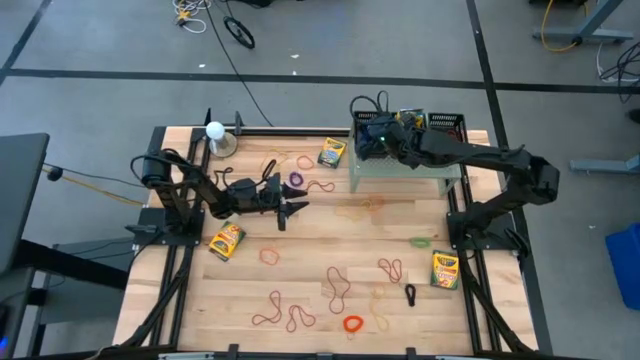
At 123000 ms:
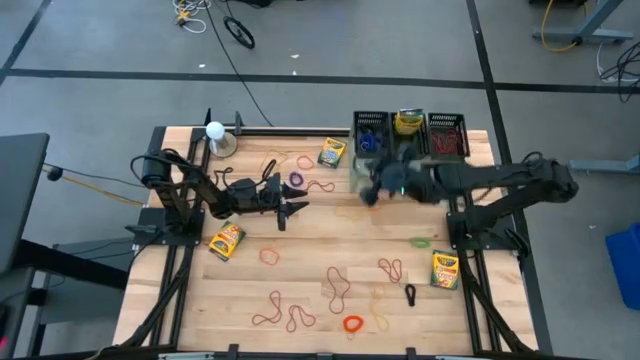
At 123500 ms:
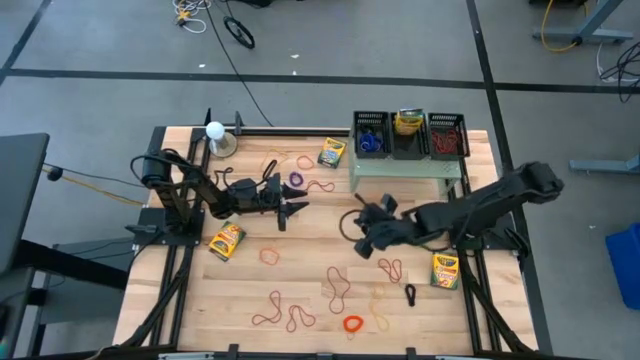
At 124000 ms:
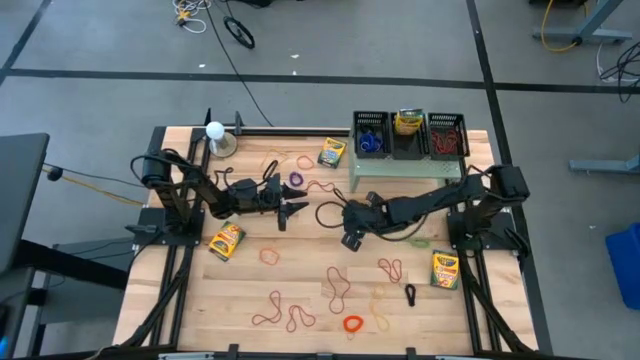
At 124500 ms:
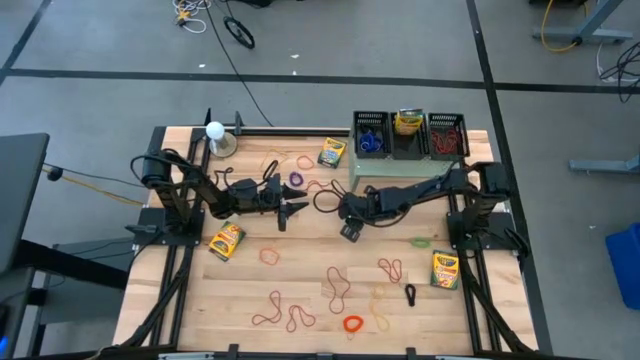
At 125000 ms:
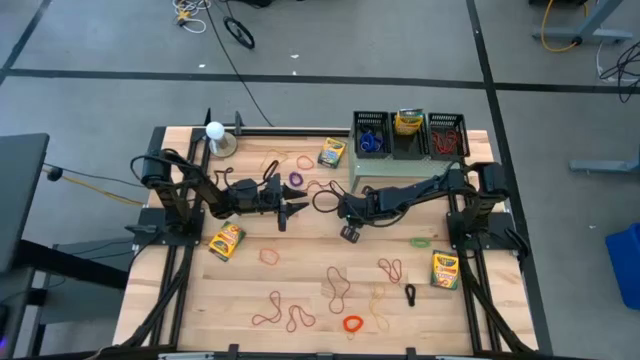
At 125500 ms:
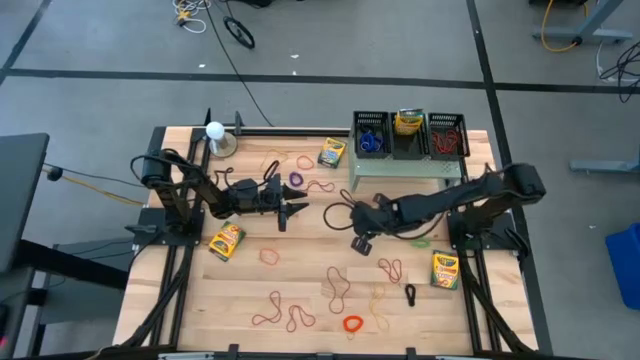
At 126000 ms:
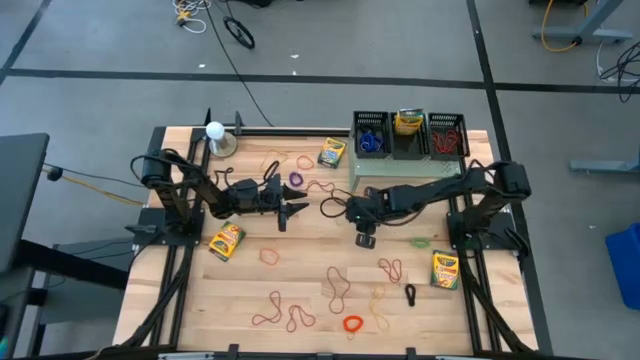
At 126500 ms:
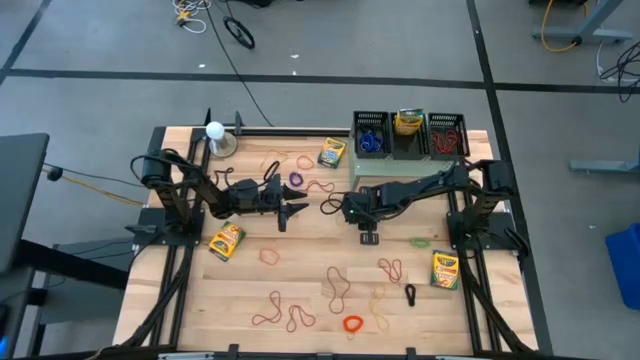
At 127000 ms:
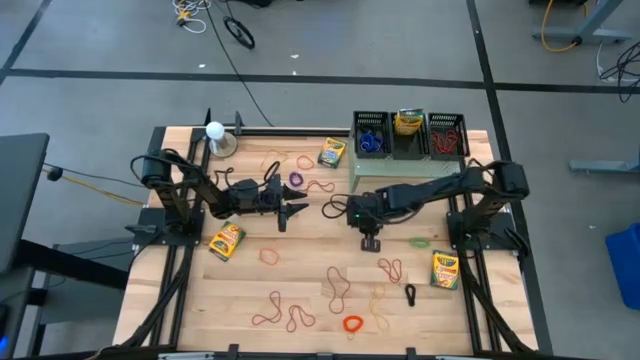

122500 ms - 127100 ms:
Task: Pick & Place Office Desk Supplies
Put the middle yellow rubber band into the right black basket on the shelf

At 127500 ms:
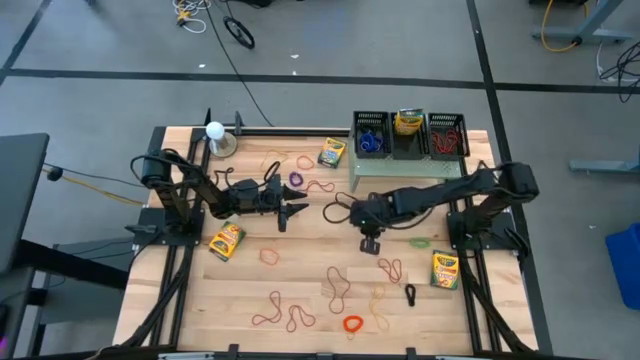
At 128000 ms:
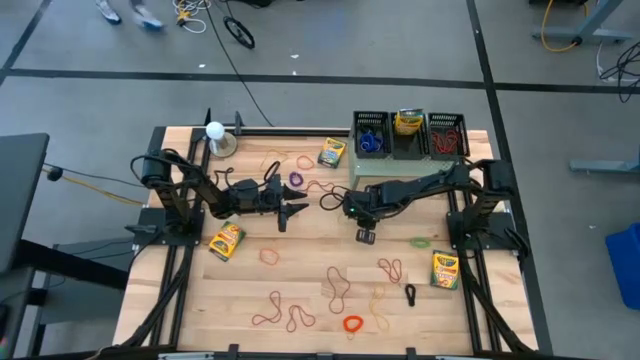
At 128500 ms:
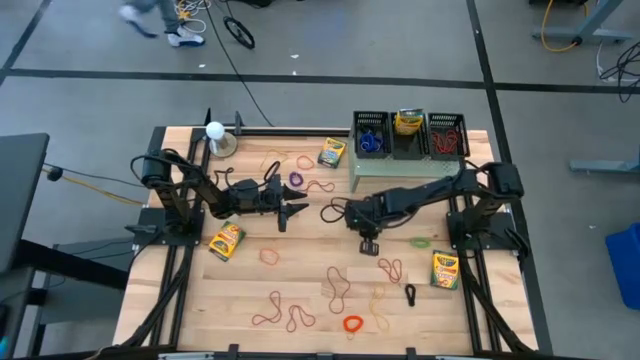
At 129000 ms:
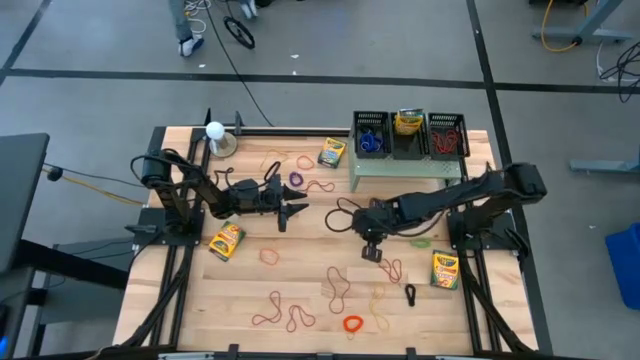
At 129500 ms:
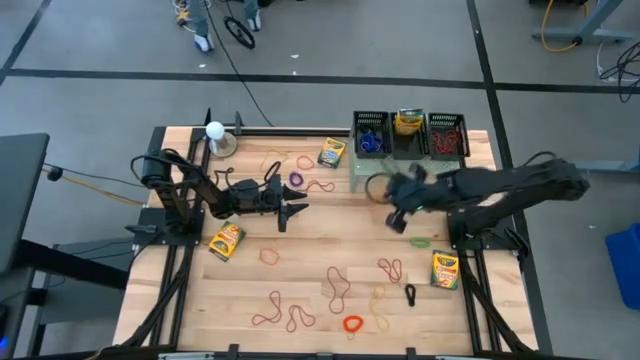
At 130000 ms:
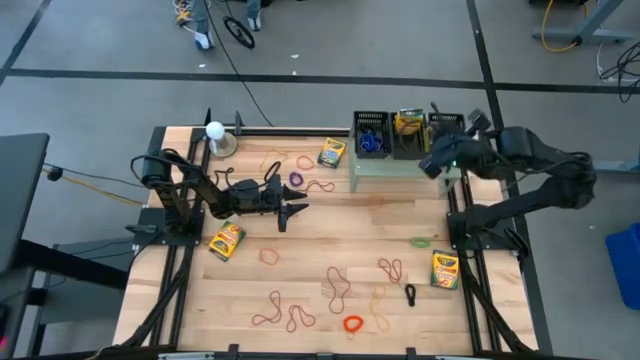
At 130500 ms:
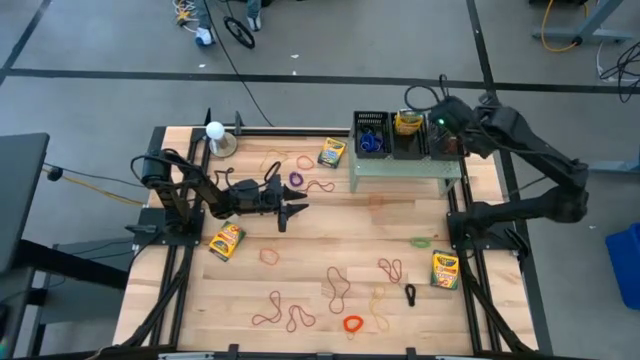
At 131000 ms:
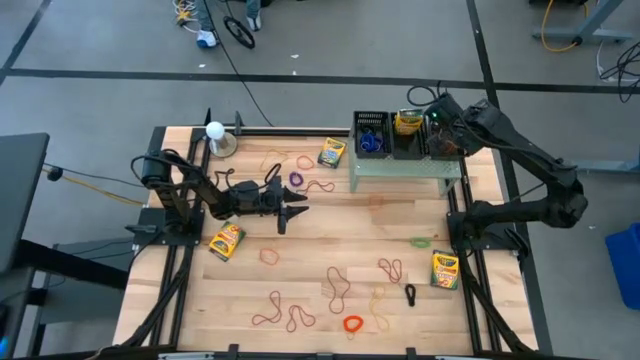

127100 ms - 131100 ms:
Put the middle yellow rubber band into the right black basket on the shelf

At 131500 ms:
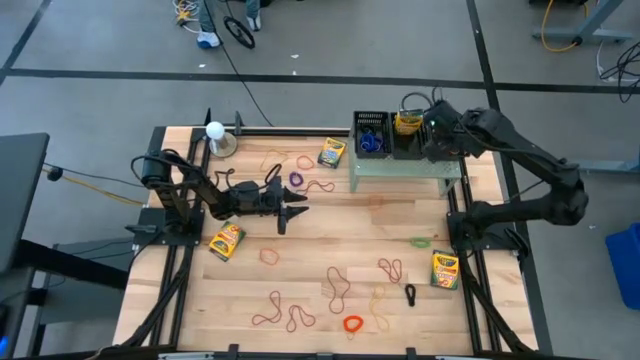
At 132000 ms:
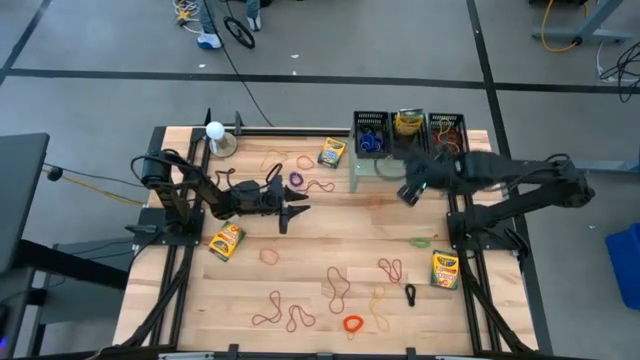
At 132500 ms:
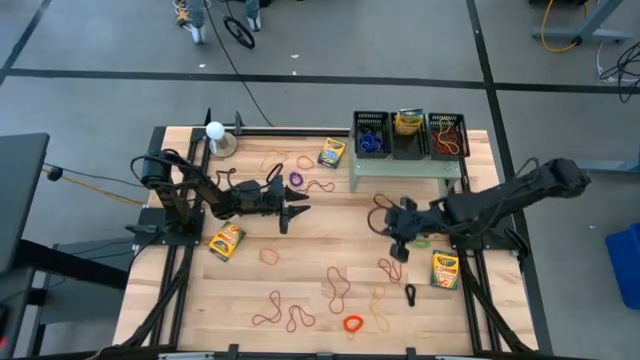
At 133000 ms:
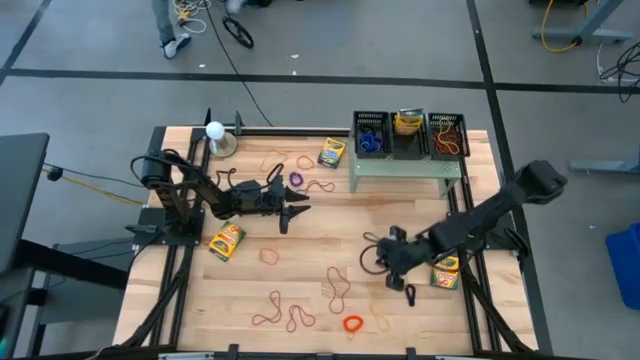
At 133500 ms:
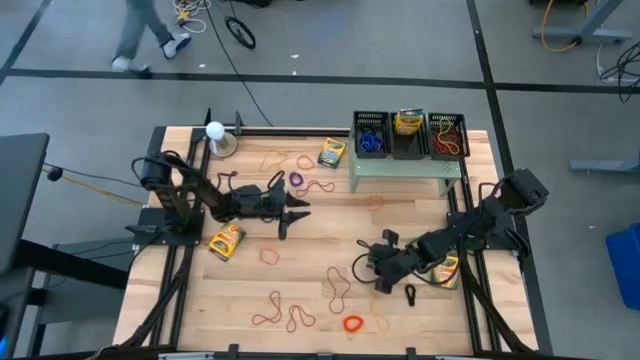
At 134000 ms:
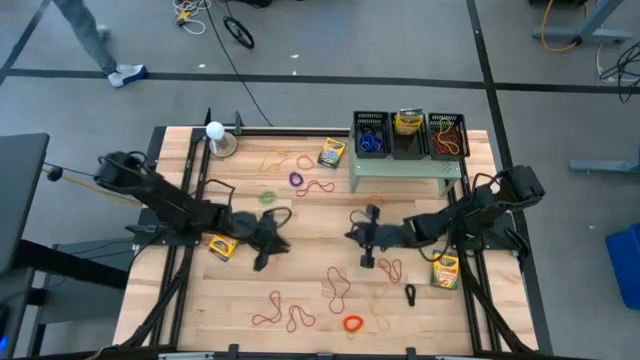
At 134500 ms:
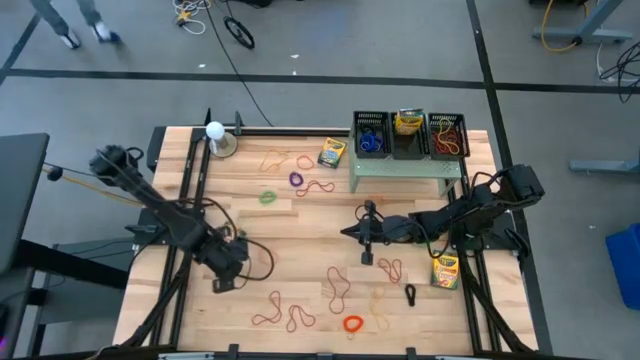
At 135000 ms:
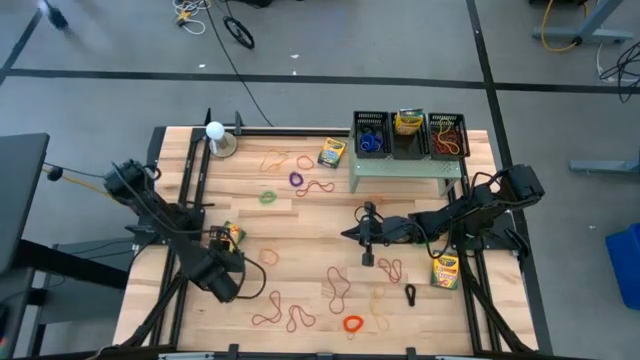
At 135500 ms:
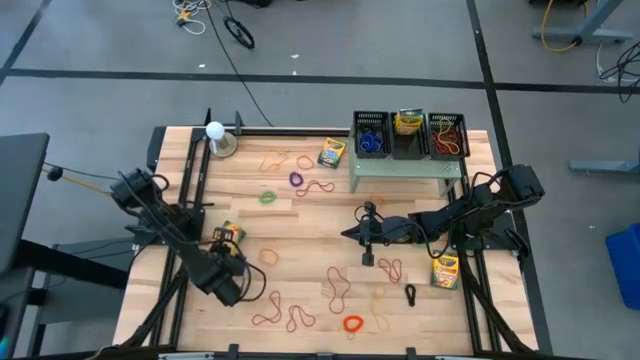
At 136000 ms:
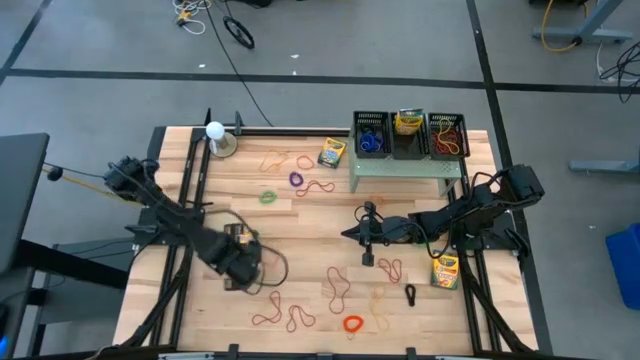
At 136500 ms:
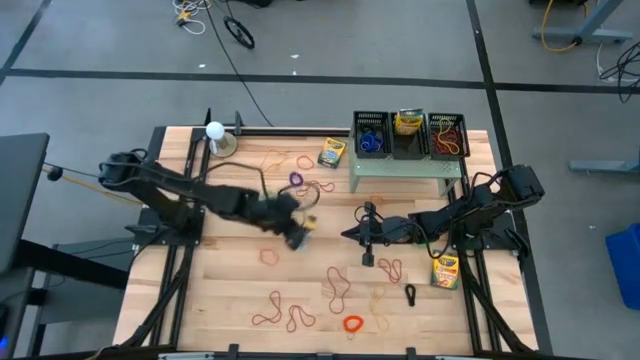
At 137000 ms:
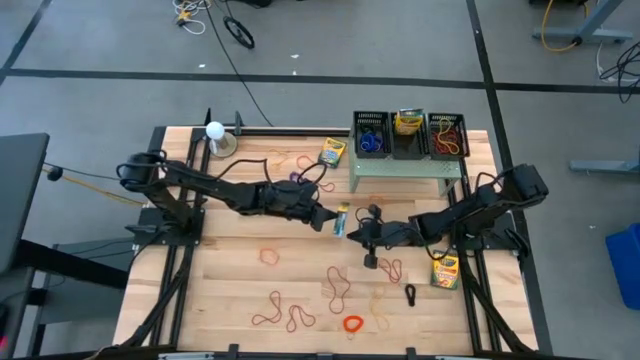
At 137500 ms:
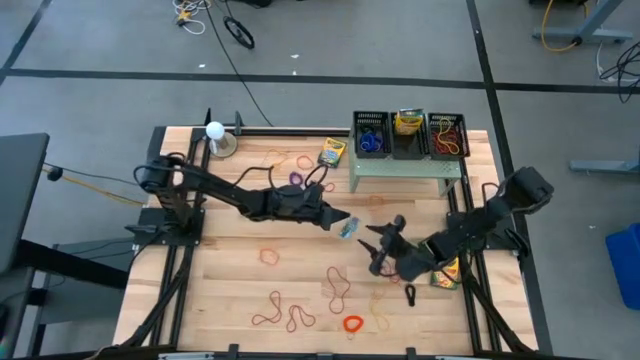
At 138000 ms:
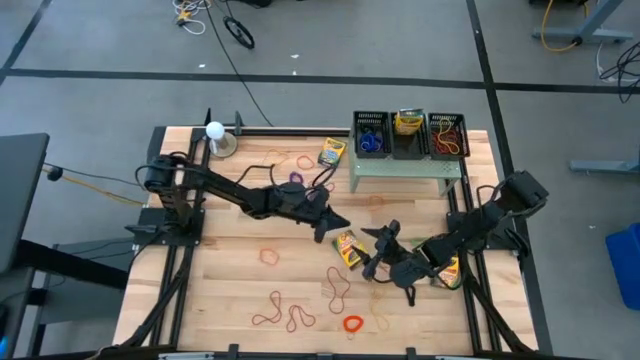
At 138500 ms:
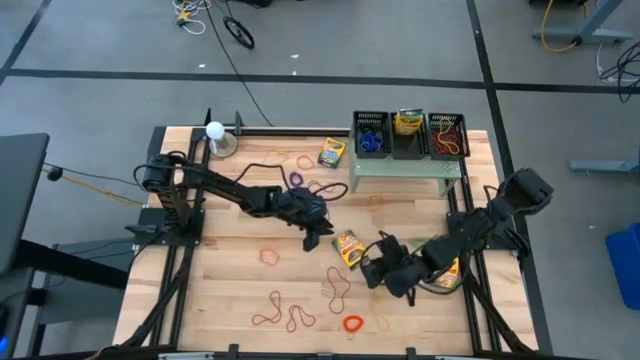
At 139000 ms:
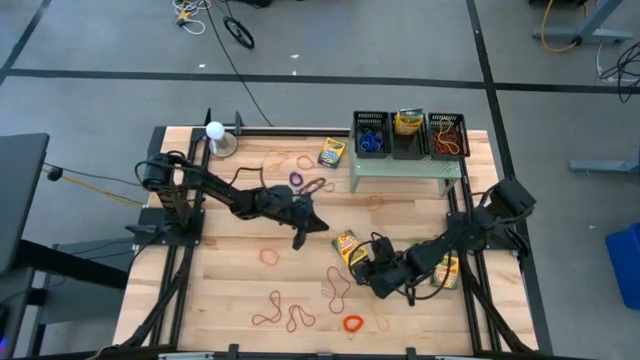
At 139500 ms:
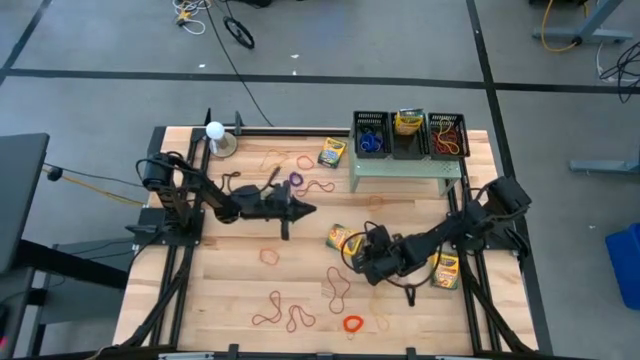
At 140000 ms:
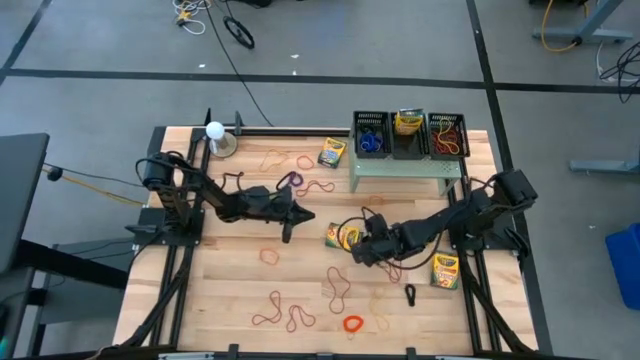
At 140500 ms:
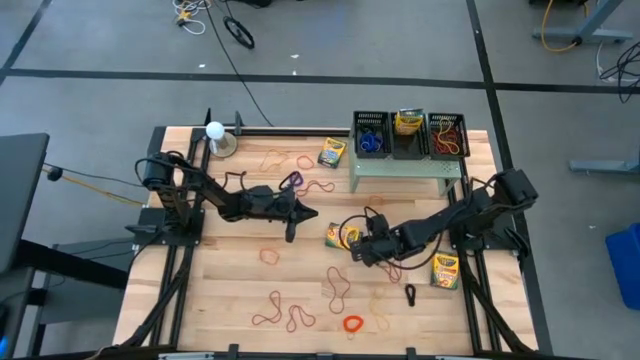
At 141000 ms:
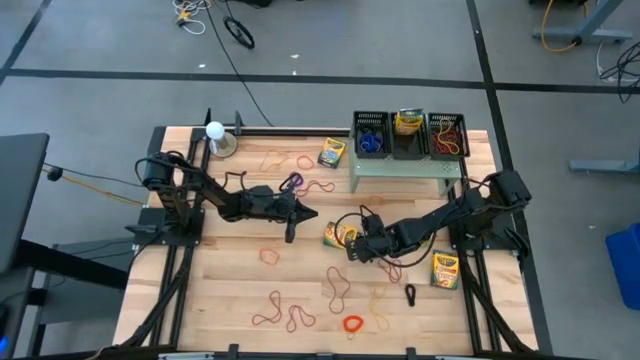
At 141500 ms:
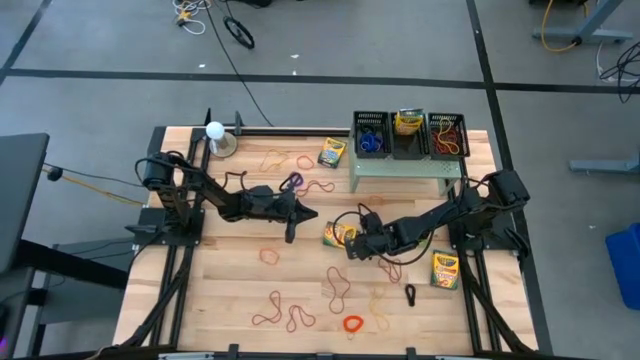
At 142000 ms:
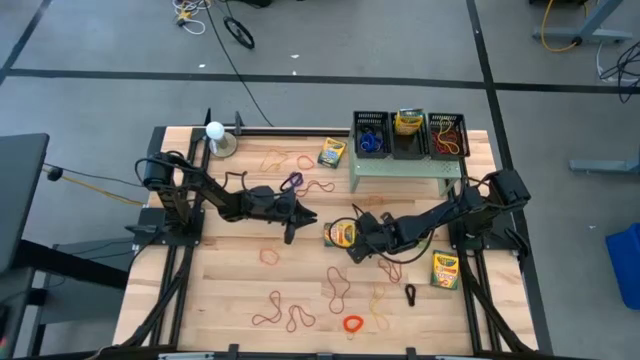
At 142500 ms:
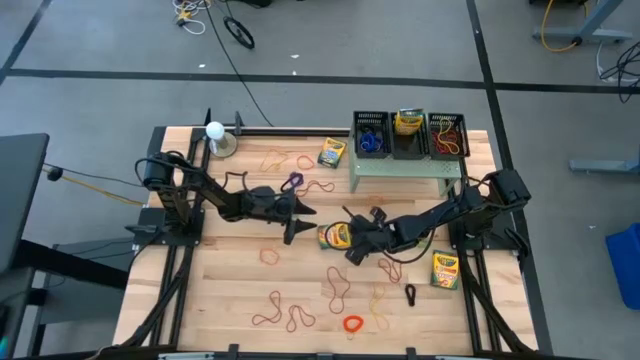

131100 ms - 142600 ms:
Put the middle yellow crayon box into the middle black basket on the shelf

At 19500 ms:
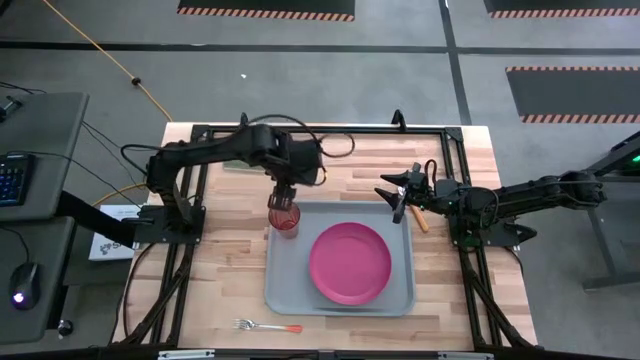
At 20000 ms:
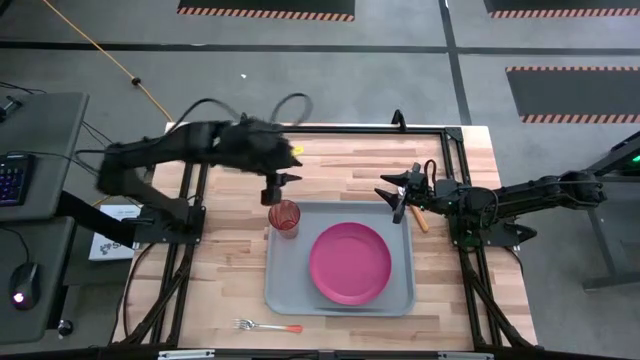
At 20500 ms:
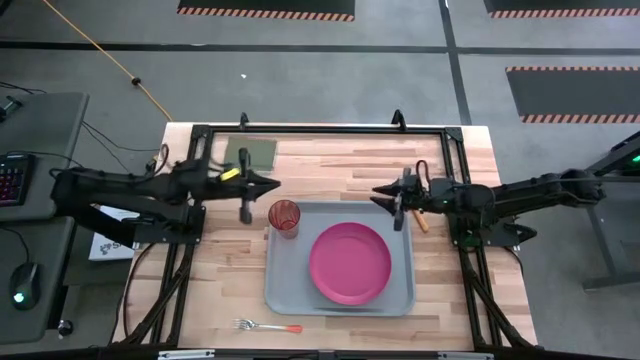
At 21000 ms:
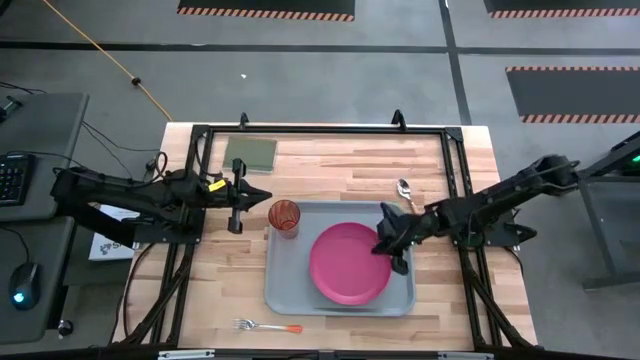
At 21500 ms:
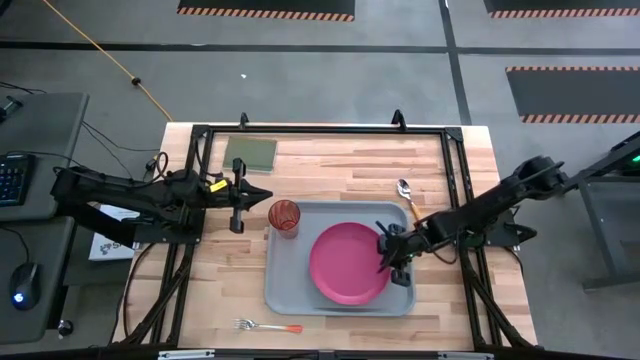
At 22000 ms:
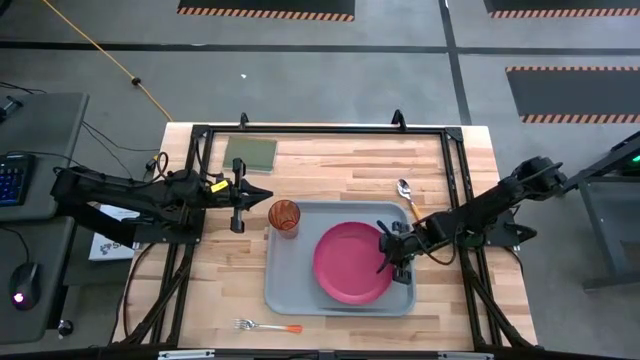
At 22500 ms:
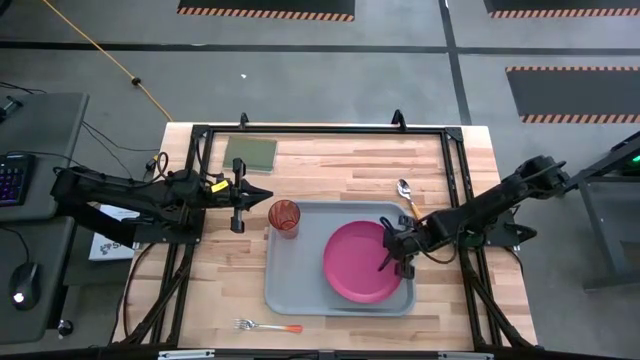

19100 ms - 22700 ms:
Task: Pick and place plate/cup/fork/spoon on tray
Adjust the pink plate on the gray tray
